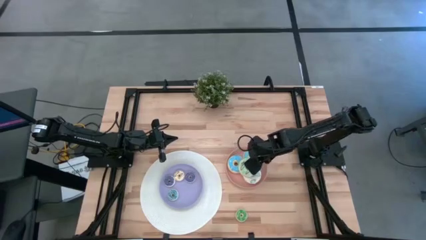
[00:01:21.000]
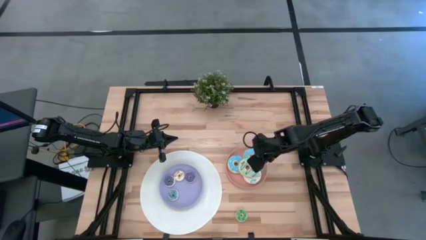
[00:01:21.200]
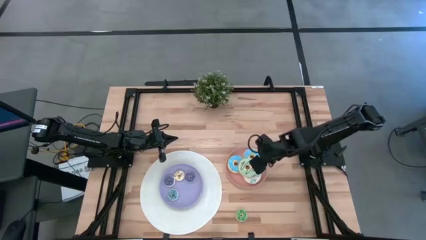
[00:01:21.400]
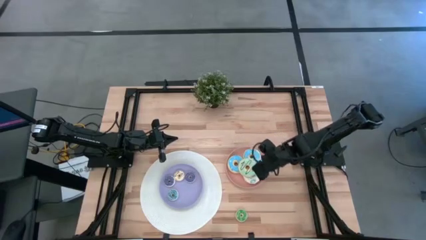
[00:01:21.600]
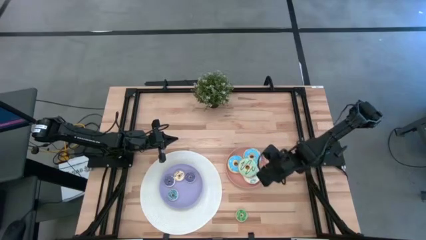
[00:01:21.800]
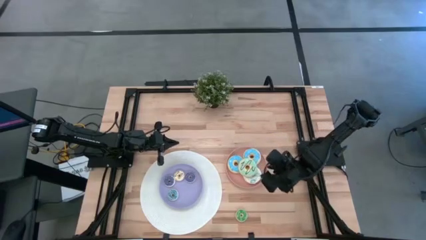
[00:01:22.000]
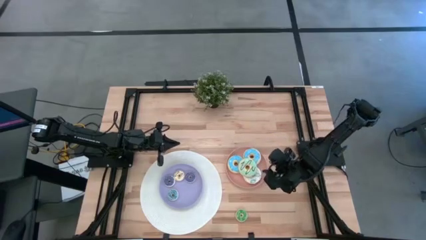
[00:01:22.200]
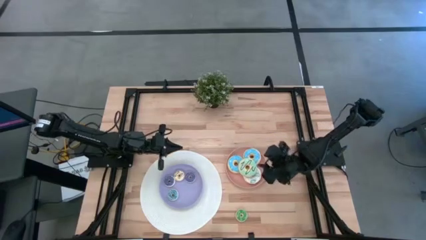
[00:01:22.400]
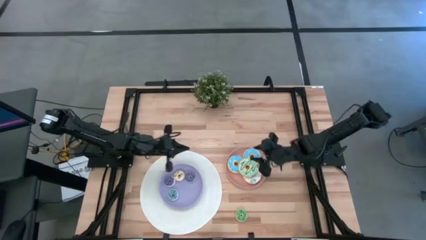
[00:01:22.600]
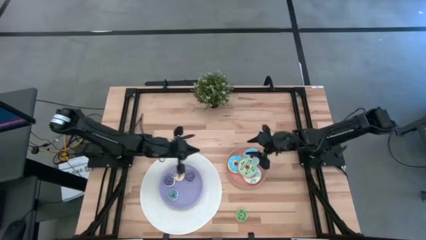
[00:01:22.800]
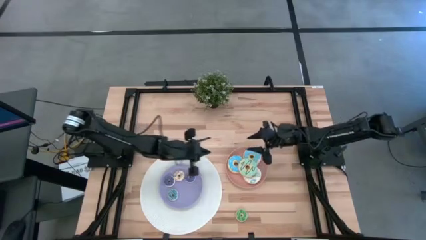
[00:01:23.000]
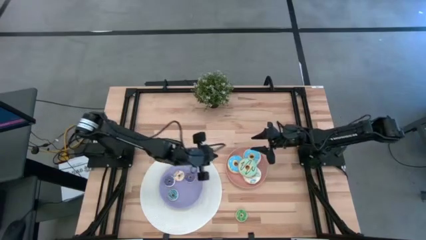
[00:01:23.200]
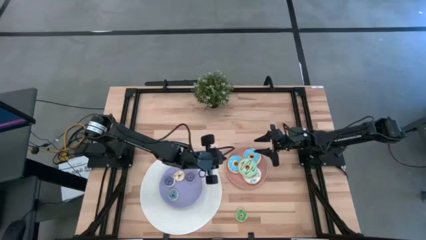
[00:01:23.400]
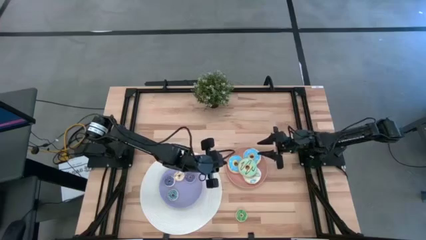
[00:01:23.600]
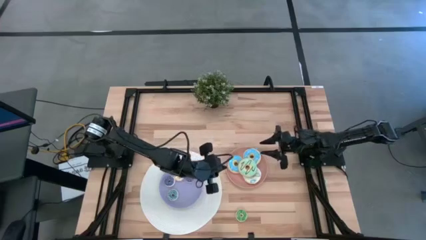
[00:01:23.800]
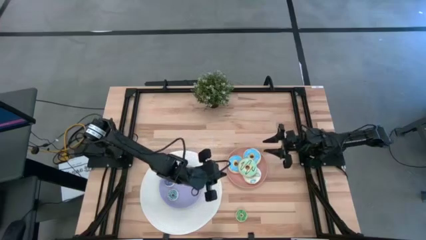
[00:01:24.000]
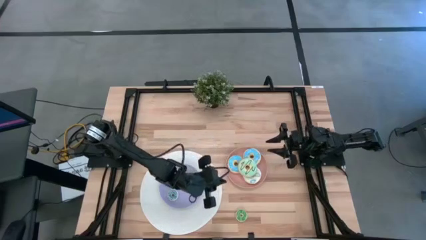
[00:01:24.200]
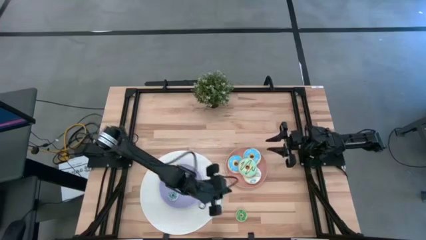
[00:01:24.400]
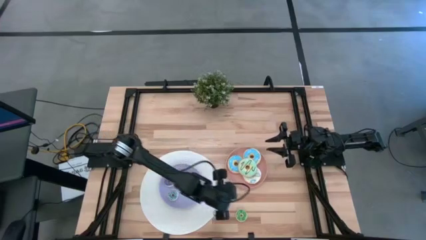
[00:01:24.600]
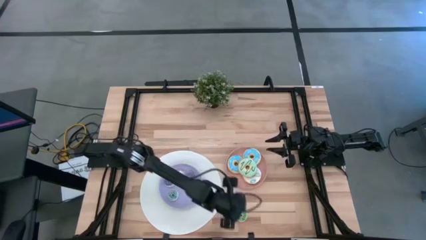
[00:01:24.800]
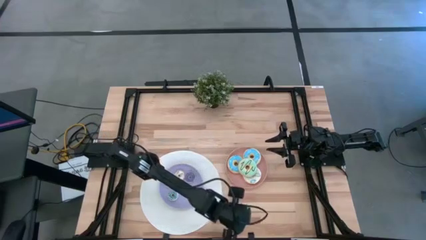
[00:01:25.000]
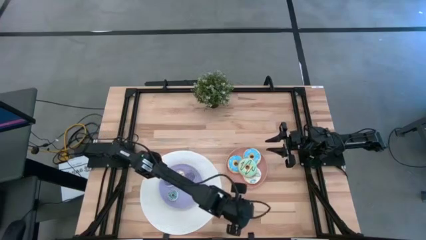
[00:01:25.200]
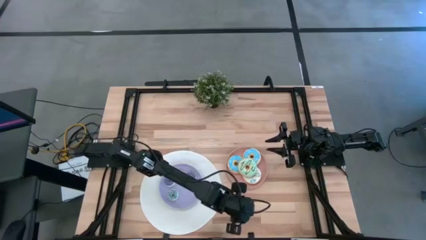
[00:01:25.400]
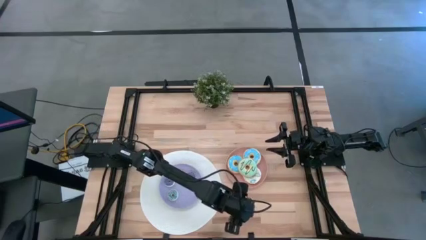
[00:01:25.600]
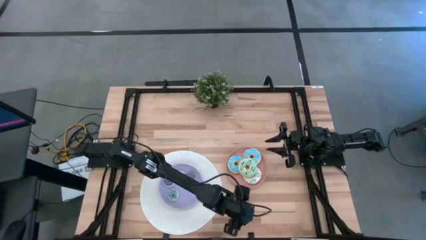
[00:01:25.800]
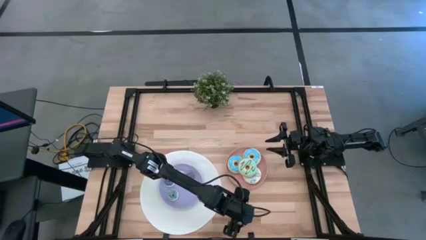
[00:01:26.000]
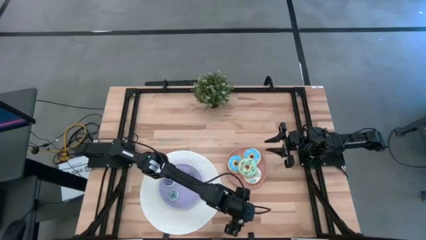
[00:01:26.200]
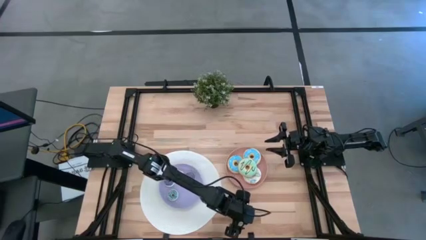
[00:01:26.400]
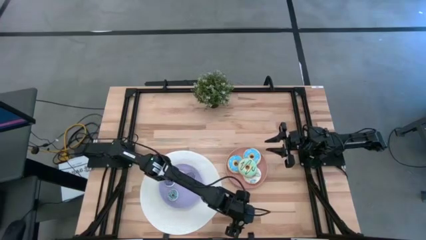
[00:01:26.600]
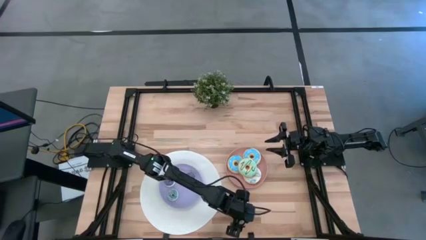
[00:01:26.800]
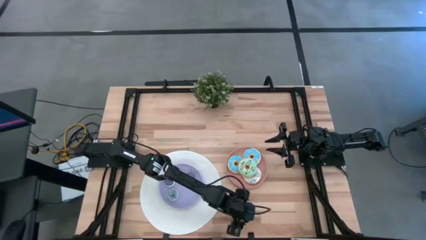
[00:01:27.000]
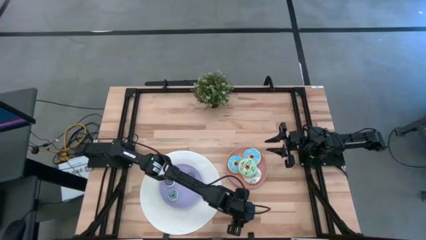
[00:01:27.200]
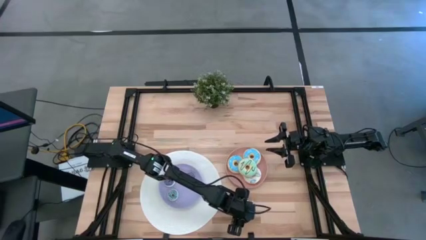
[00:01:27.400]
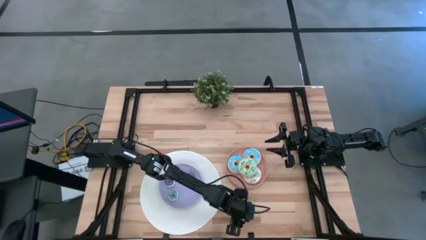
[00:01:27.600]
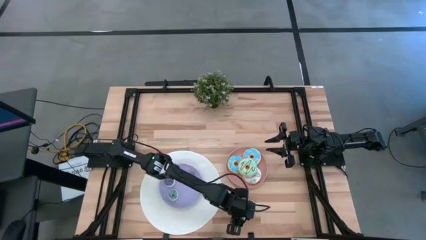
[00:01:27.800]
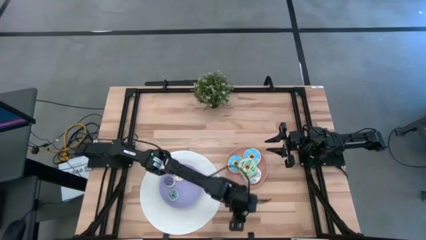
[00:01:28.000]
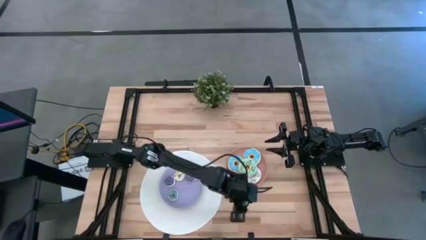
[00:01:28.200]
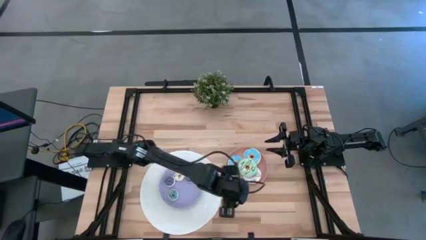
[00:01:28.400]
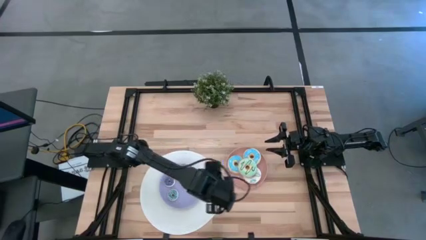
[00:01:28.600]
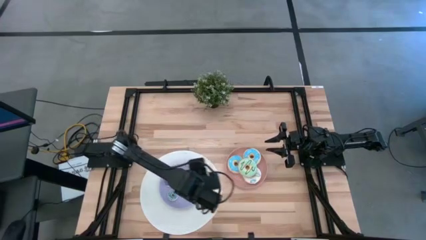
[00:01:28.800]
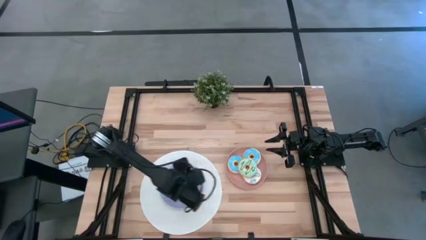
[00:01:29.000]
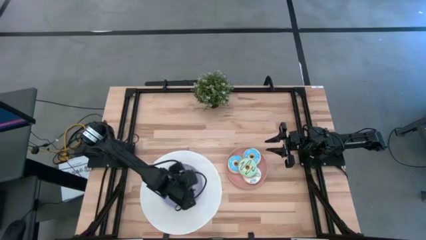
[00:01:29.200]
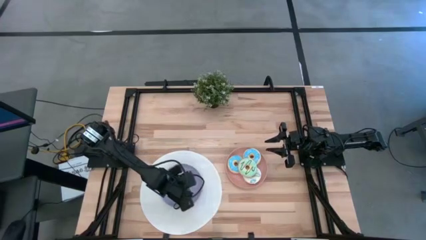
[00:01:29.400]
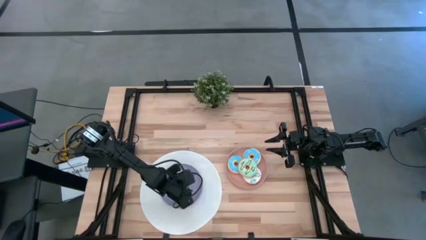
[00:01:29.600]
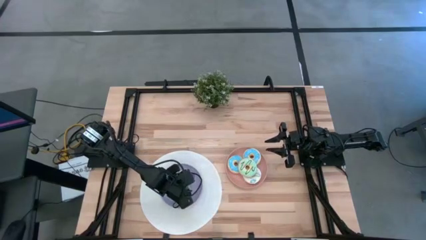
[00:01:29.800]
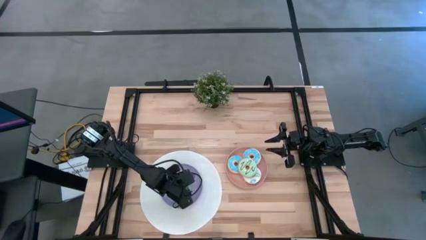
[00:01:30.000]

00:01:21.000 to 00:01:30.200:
Task: Pick & Place donuts
Put the small green donut on the violet plate

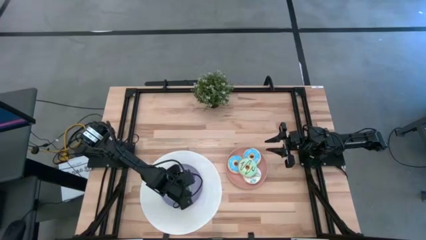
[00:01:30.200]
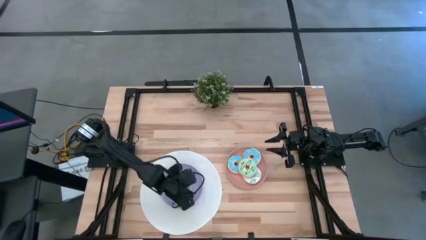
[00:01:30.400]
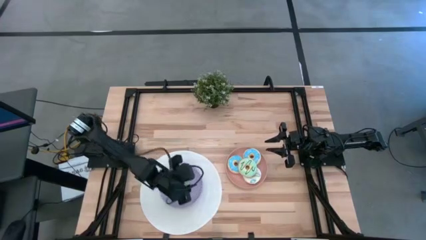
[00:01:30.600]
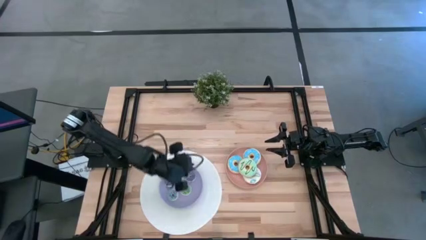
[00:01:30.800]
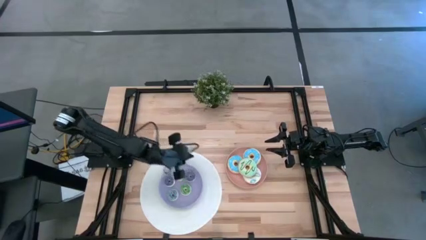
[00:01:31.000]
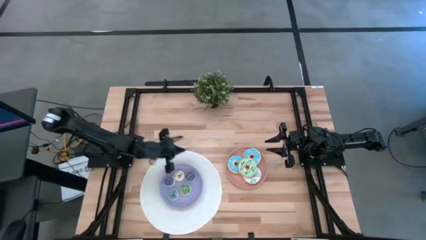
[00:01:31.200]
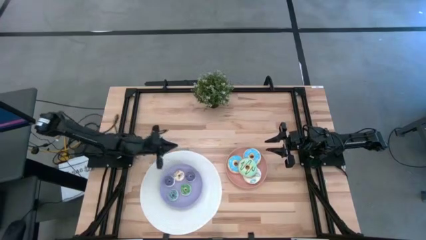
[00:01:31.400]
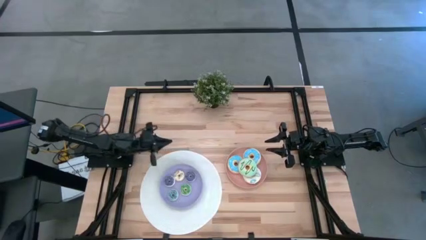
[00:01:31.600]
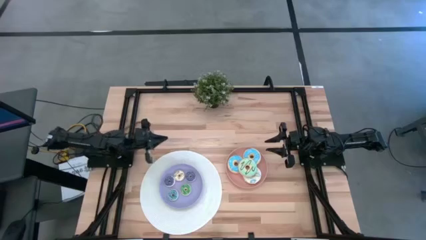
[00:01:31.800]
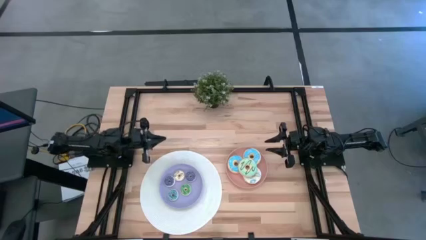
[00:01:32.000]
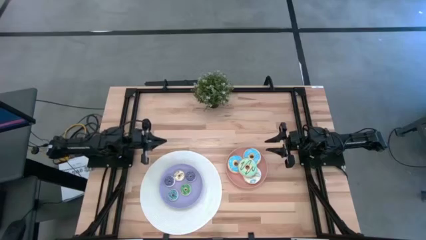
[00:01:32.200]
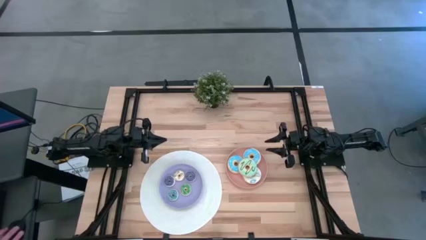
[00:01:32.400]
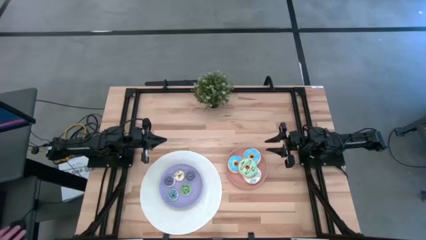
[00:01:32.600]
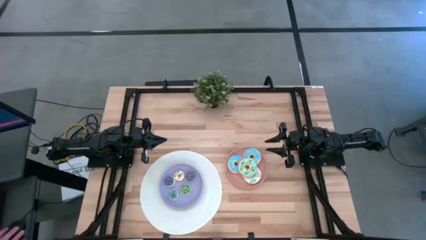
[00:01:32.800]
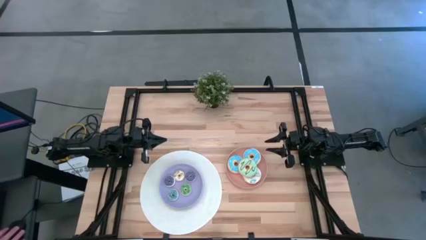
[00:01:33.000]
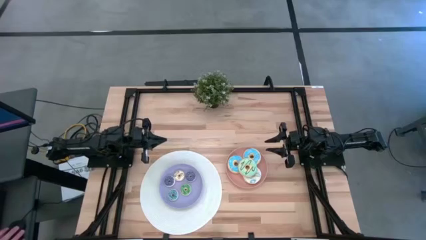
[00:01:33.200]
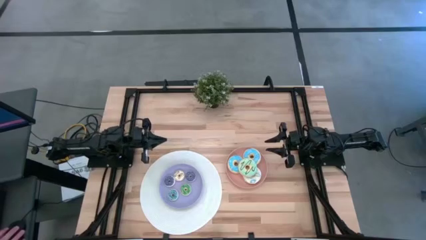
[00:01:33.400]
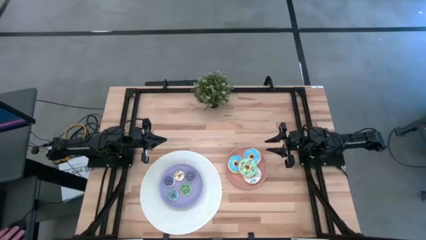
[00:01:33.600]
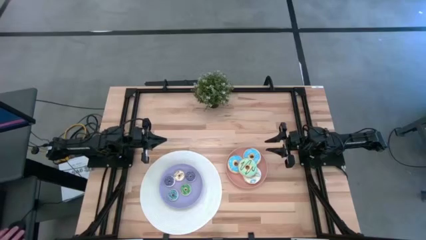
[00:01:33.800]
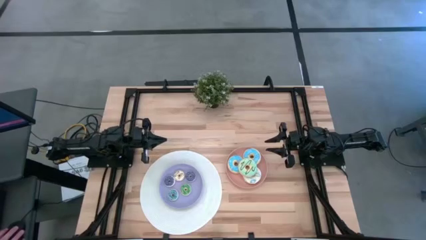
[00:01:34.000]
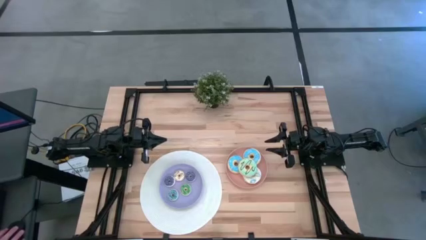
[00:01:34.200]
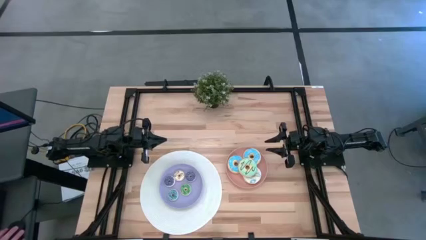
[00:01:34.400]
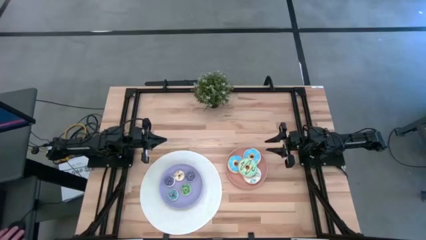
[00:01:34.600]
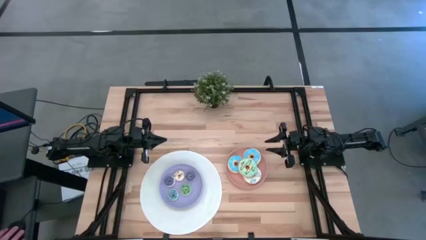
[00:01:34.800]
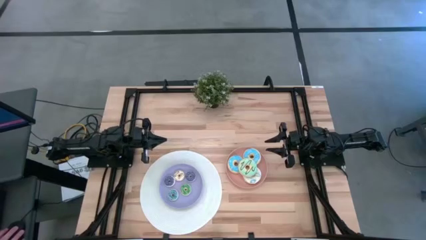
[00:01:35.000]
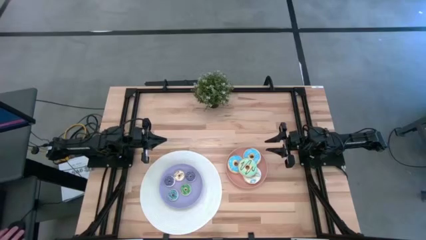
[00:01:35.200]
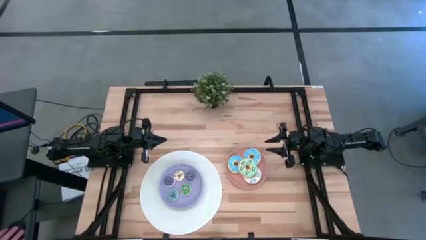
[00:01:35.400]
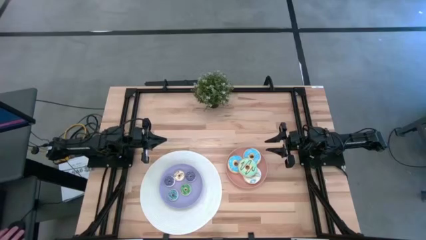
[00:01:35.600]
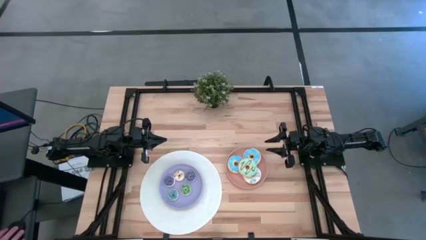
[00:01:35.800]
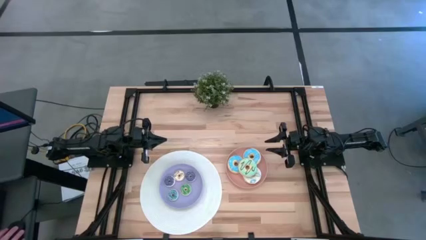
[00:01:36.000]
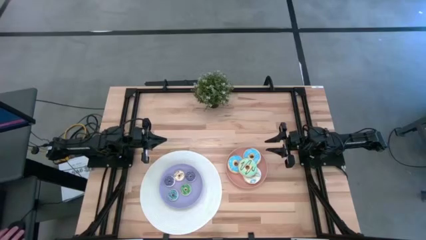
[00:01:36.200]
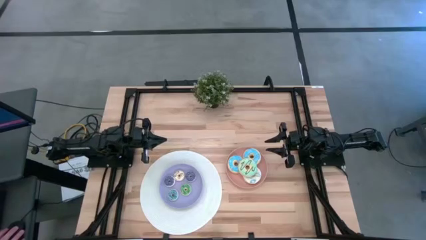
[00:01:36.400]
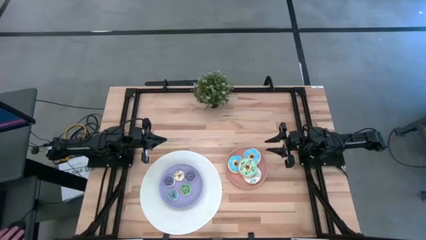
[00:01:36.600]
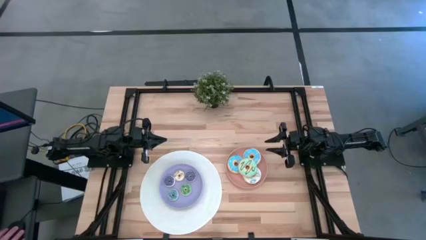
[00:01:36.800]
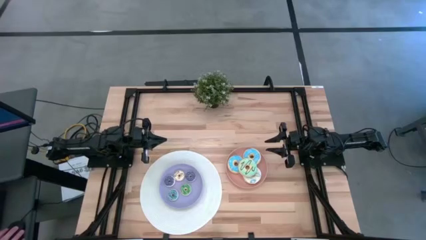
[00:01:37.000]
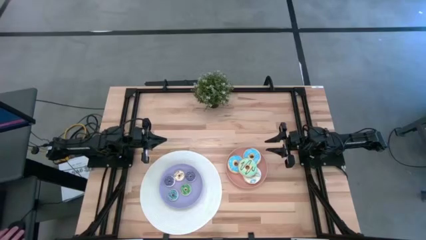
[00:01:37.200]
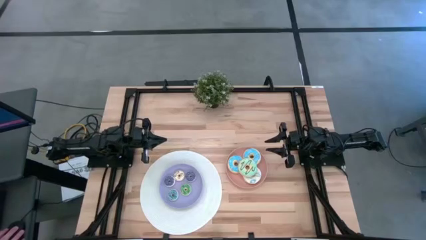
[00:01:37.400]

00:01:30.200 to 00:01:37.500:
Return to Home Position
